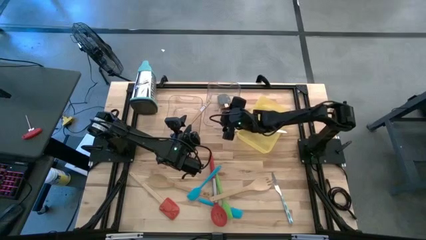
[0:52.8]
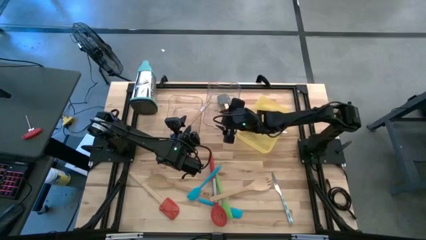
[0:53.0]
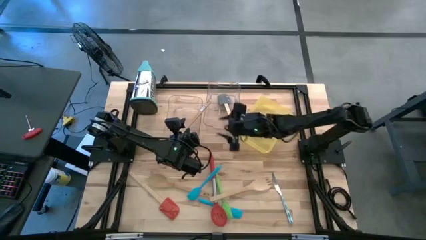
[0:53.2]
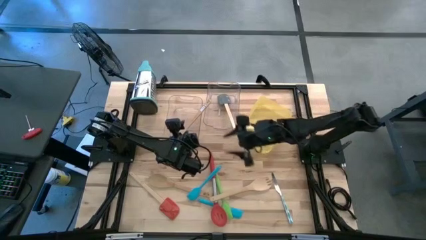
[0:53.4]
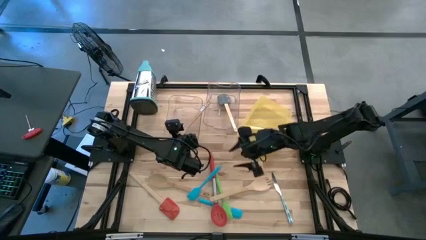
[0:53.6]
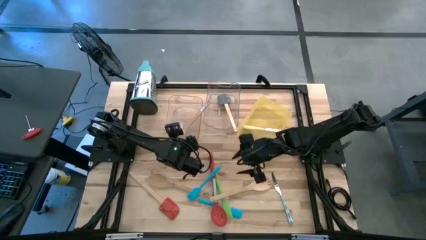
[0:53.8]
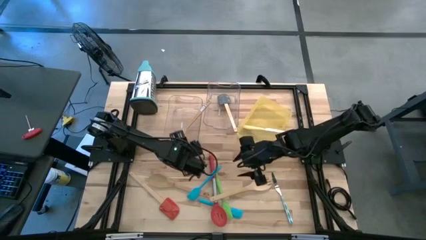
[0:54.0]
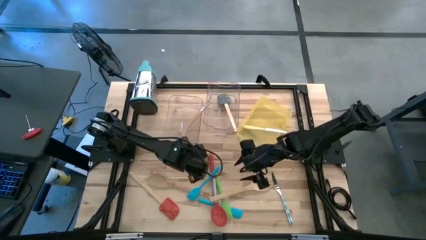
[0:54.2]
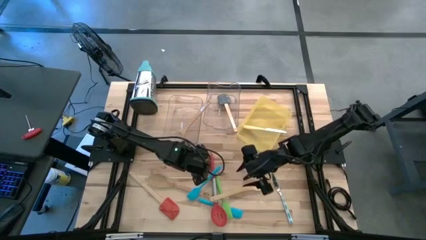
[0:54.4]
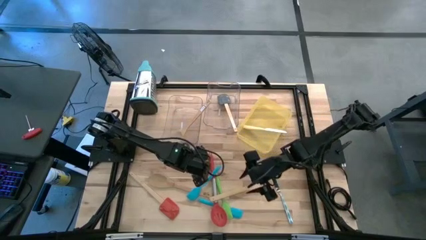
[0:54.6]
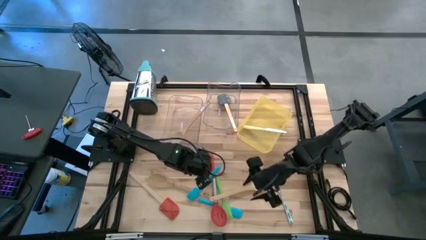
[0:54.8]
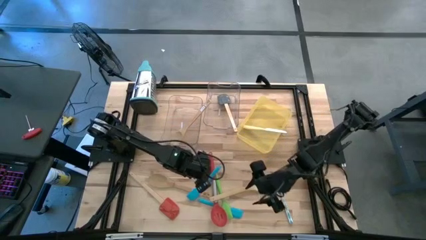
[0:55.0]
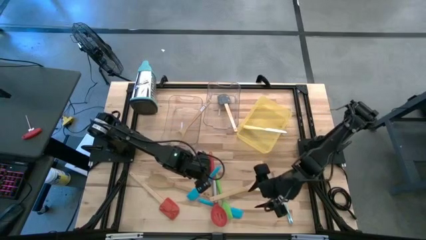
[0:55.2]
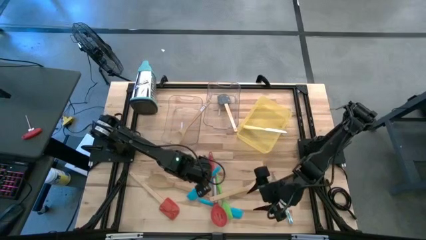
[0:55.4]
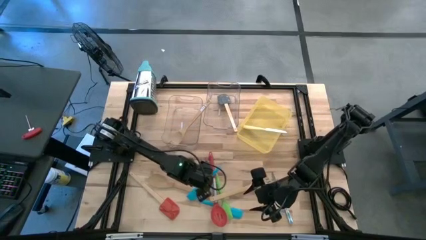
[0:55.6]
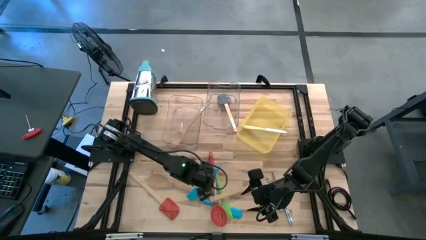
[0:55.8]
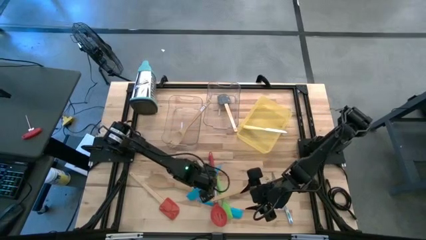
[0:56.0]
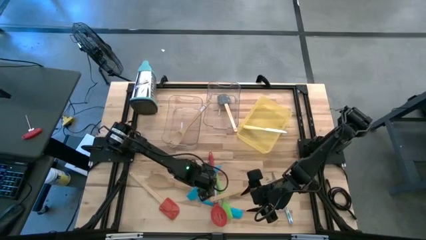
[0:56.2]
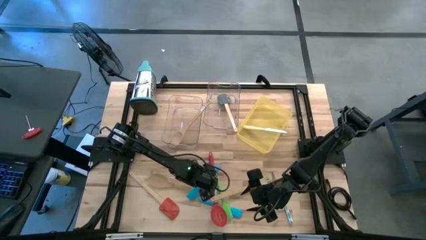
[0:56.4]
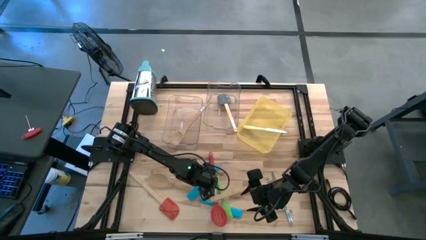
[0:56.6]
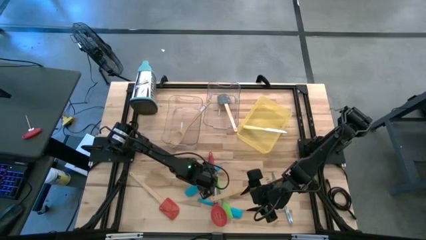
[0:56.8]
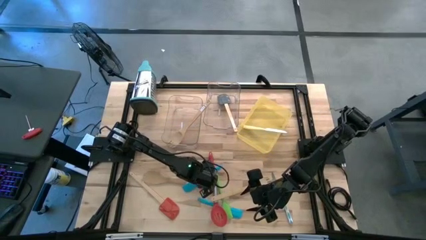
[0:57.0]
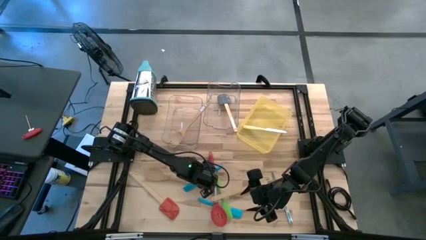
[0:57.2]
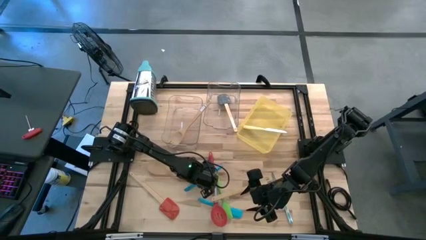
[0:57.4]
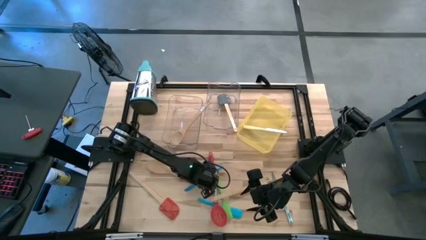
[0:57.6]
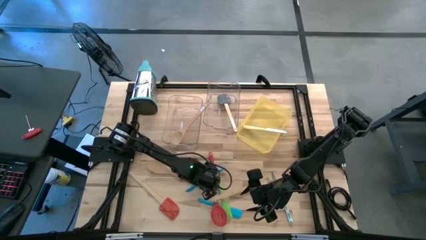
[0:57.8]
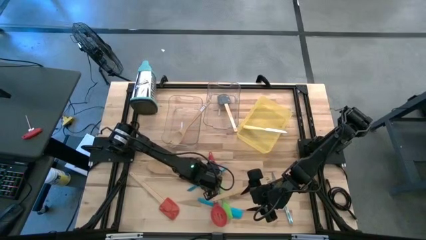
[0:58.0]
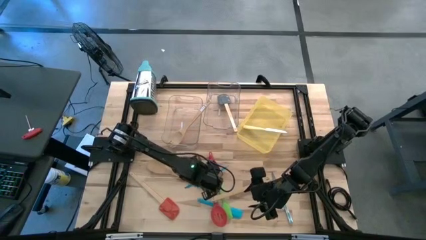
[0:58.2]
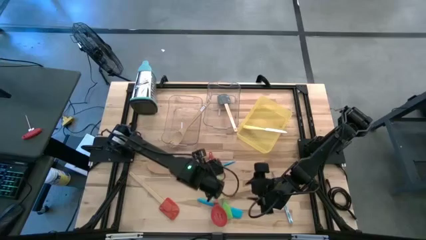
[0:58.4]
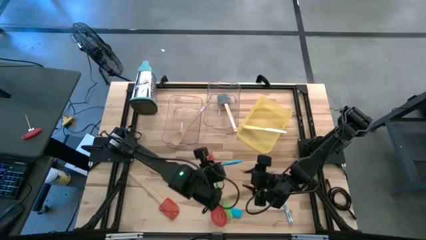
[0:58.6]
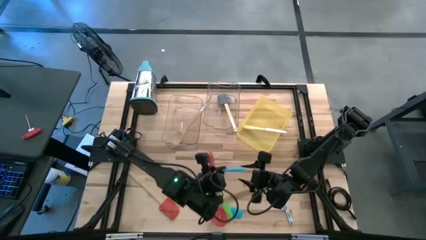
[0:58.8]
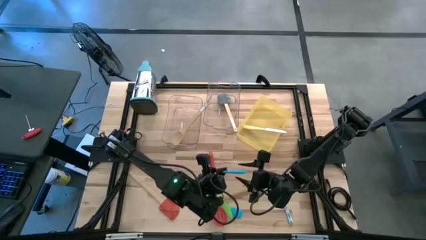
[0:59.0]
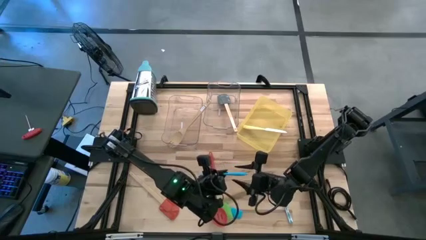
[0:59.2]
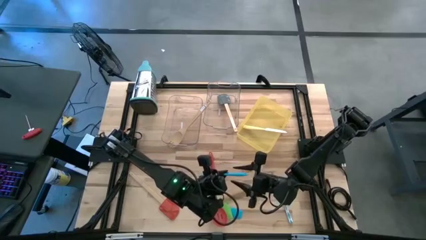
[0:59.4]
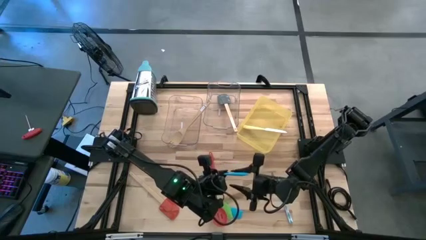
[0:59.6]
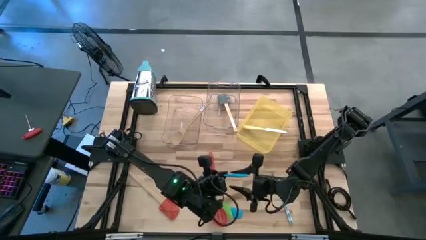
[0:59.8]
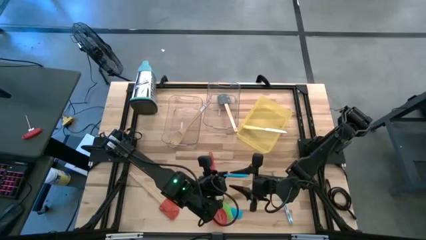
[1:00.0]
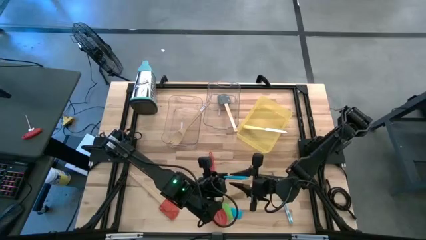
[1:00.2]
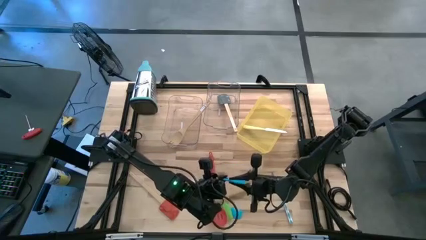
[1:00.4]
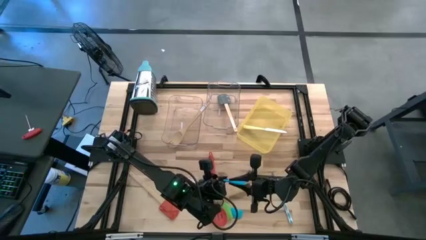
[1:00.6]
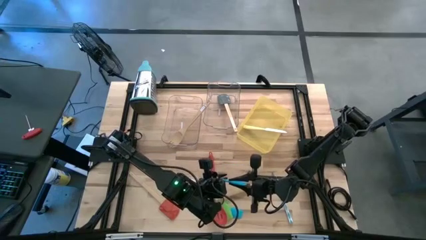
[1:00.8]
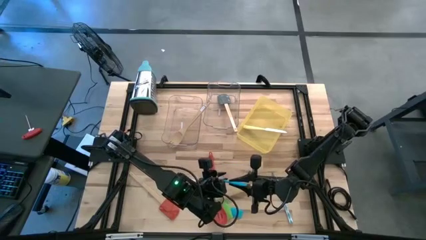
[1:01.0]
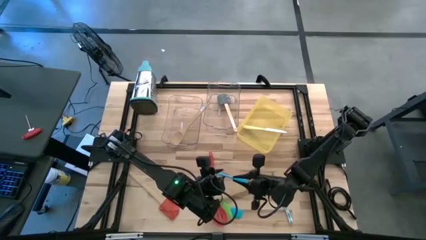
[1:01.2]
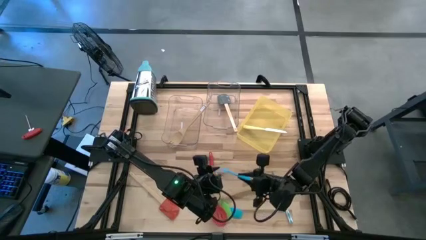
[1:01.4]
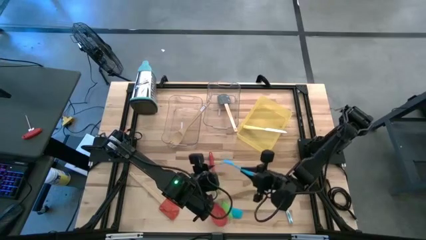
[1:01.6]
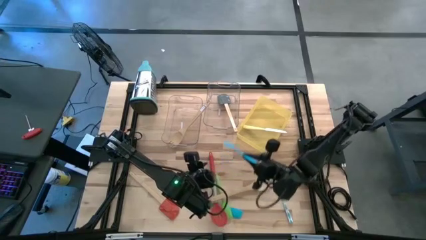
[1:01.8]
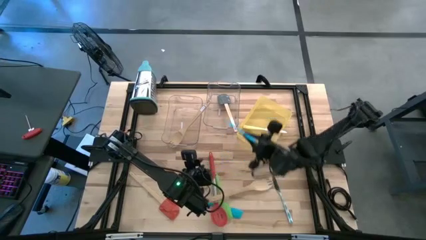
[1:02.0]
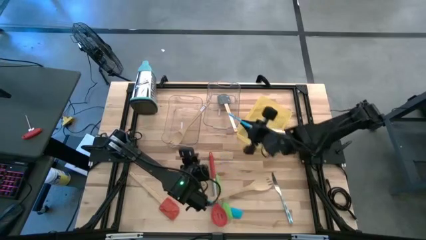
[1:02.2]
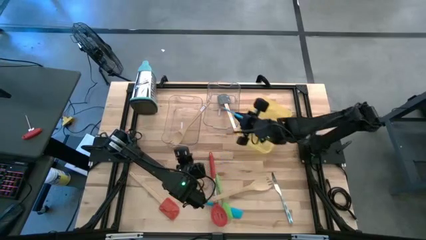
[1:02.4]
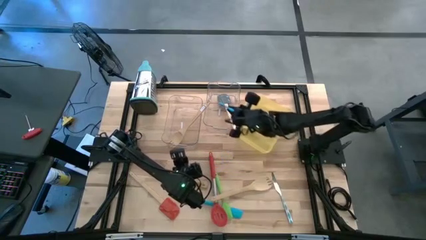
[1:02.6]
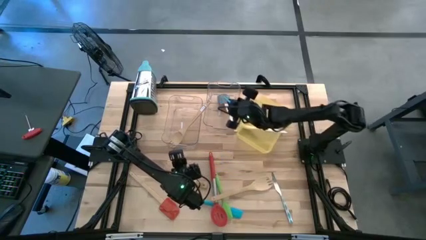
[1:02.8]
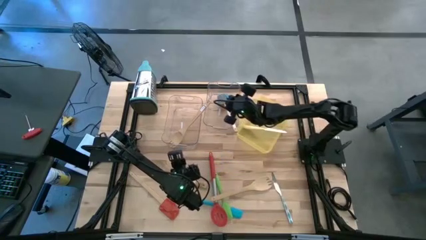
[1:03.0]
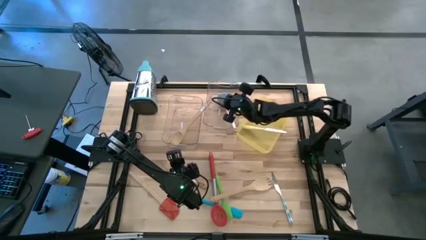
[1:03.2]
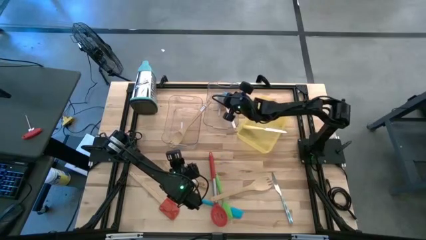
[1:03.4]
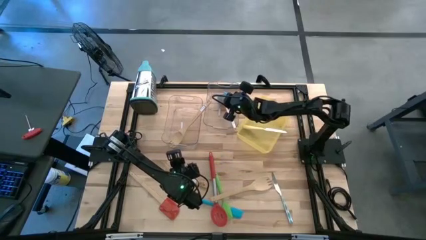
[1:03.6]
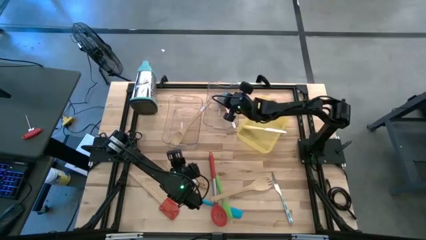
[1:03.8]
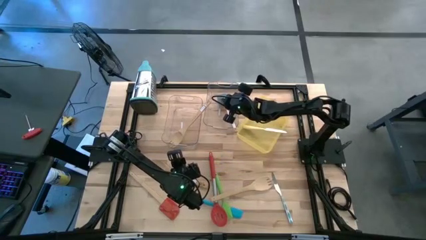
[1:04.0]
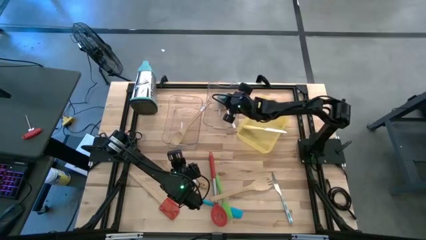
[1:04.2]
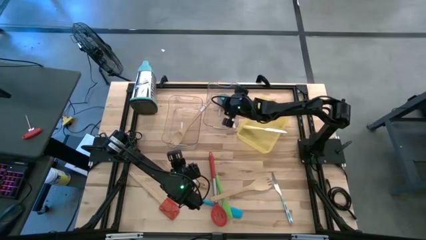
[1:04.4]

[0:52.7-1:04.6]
Task: Pick & Place Kitchen Items
Put the top blue spatula into the right transparent bin

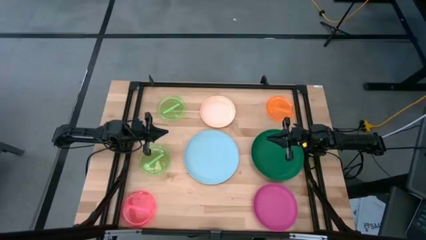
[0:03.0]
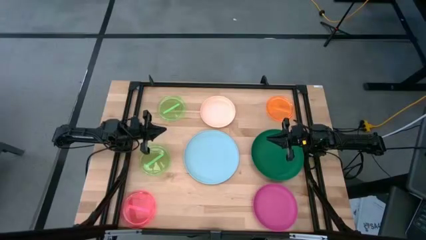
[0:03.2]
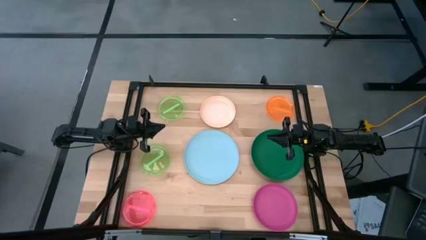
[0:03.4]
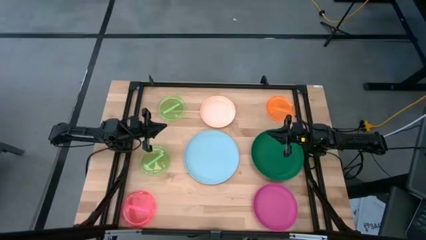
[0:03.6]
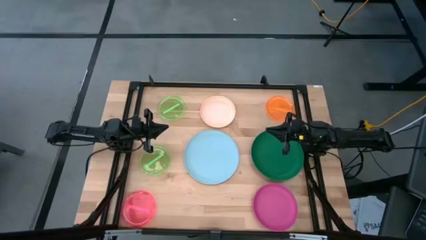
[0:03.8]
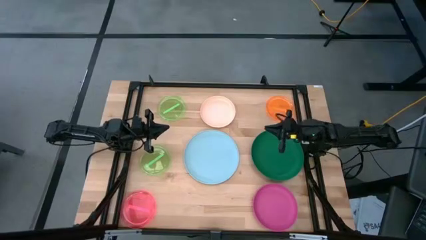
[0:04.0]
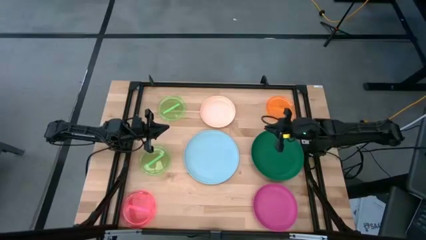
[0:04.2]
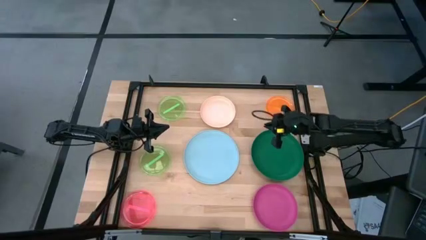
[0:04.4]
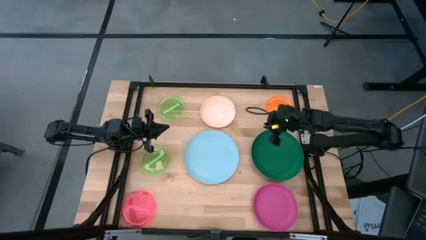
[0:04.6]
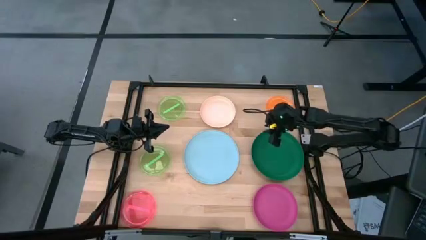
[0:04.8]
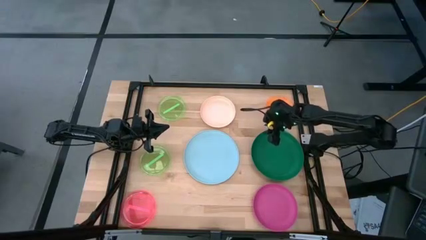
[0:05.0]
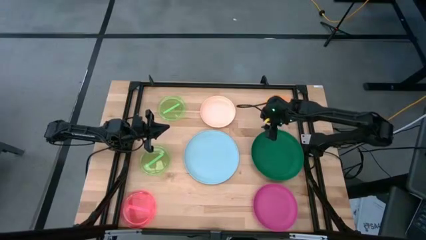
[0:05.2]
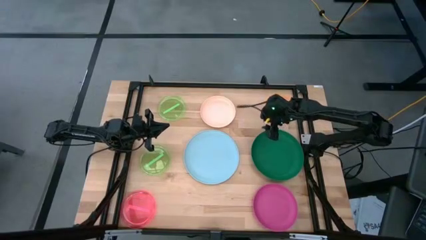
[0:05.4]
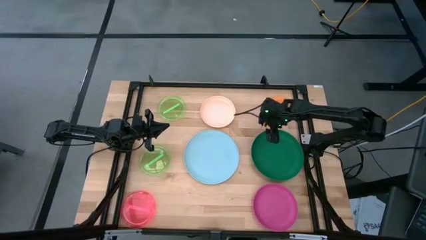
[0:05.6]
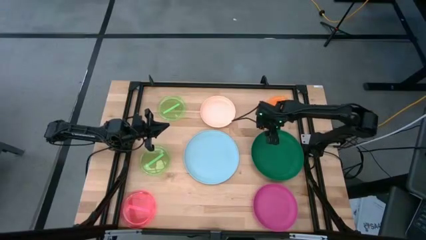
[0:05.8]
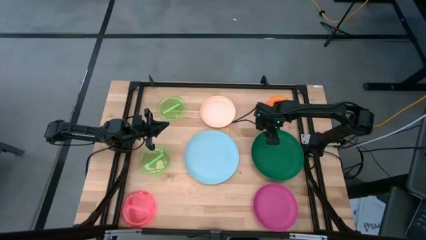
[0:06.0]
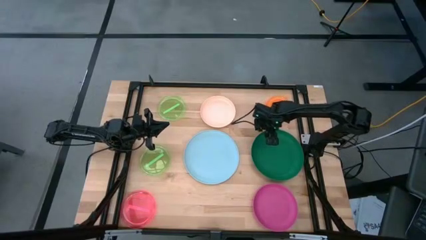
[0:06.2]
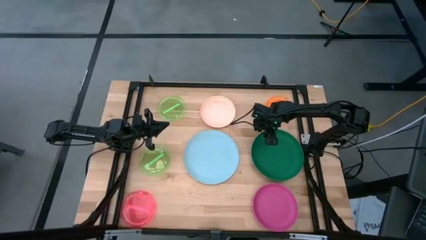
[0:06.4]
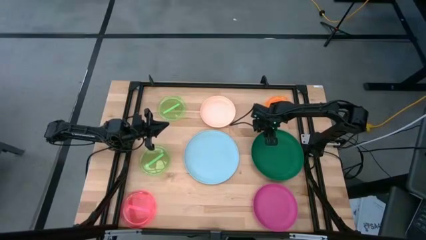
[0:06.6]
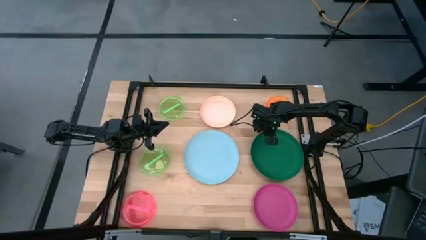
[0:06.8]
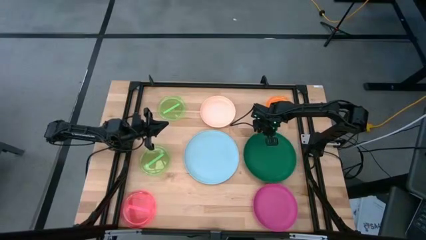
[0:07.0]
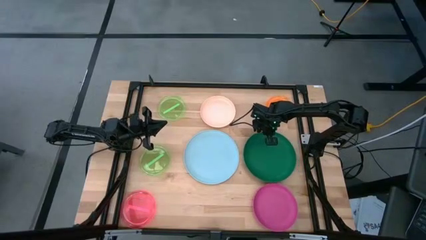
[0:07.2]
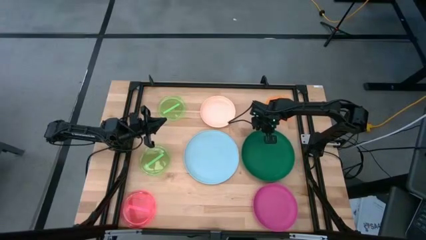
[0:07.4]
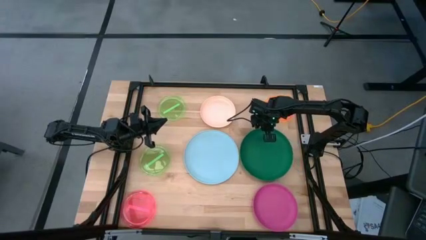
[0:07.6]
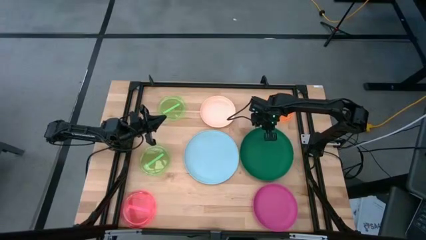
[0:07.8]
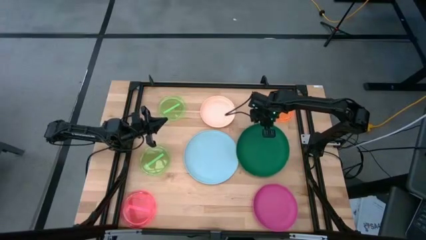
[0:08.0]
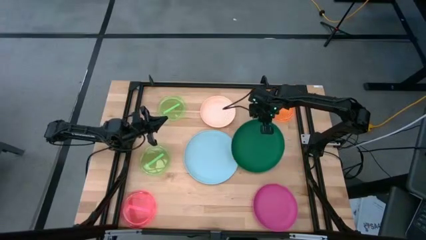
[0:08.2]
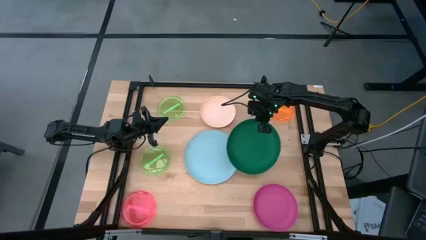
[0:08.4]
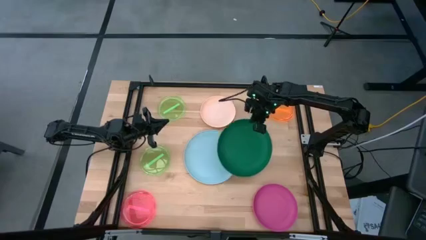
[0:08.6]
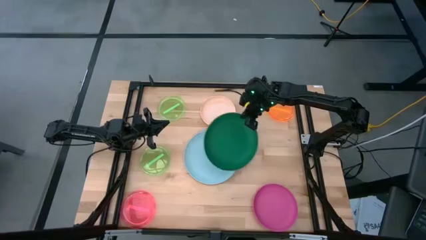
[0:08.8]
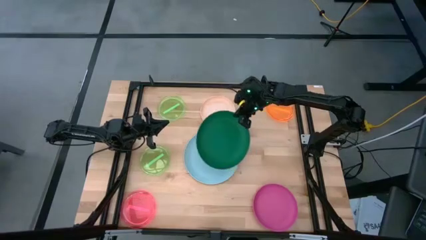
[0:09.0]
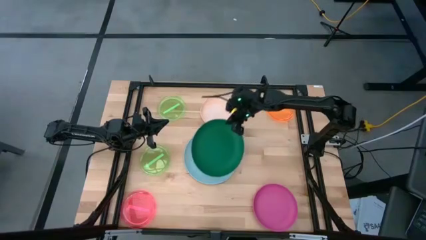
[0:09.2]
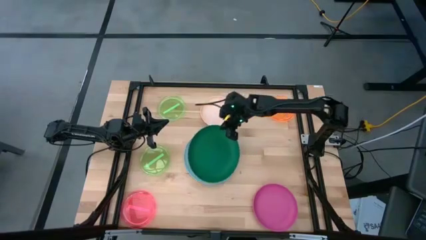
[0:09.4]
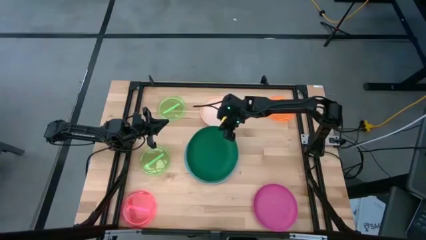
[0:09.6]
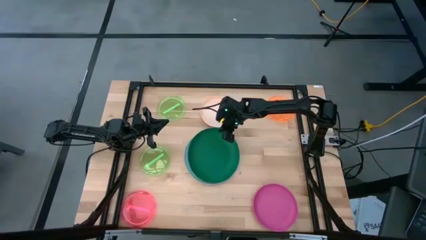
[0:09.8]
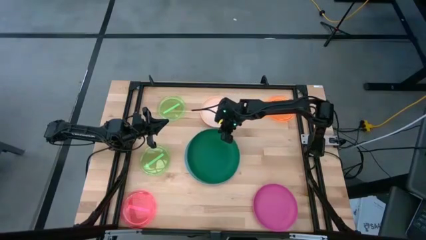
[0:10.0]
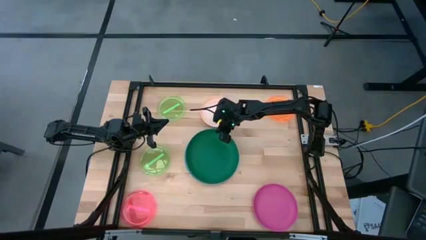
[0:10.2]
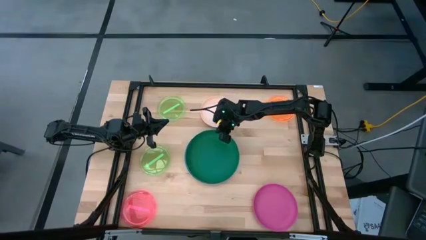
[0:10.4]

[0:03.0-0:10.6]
Task: Stack plastic plates
Stack the green plate on top of the blue plate
